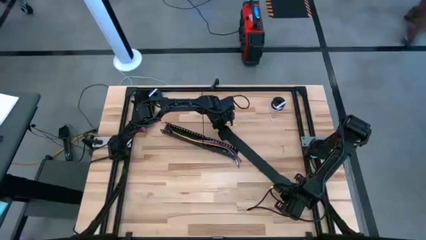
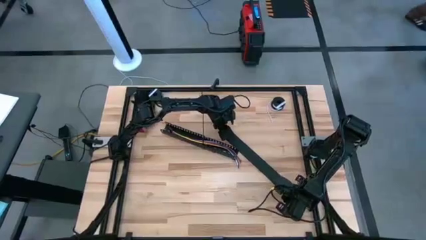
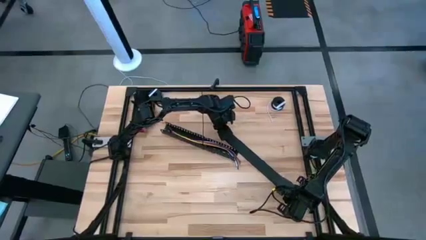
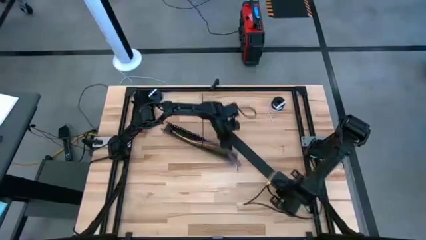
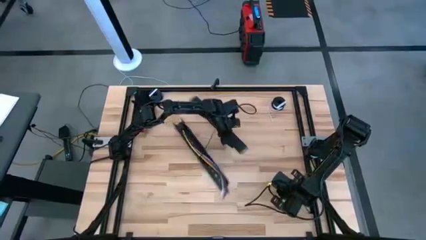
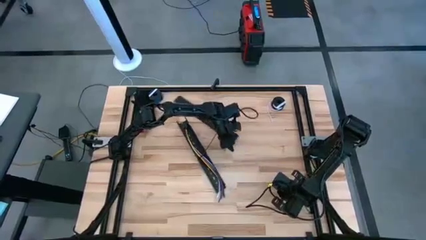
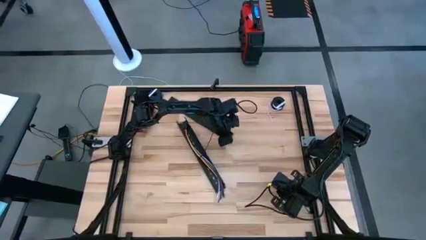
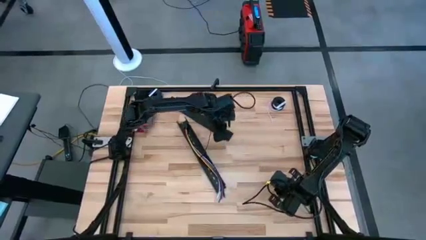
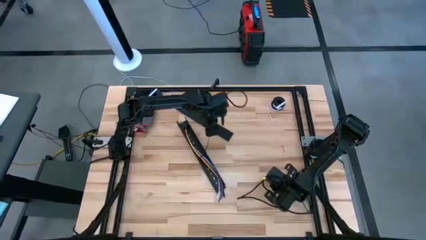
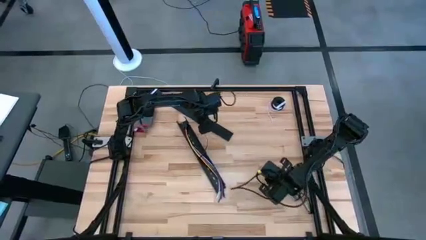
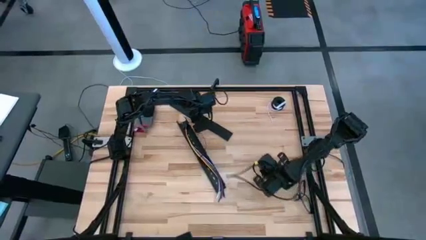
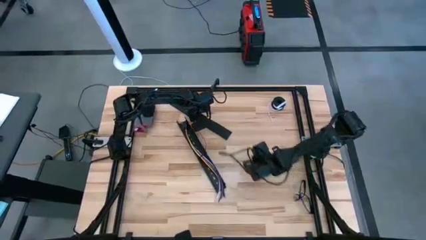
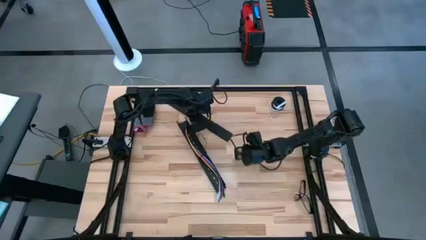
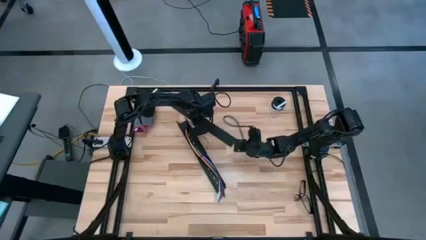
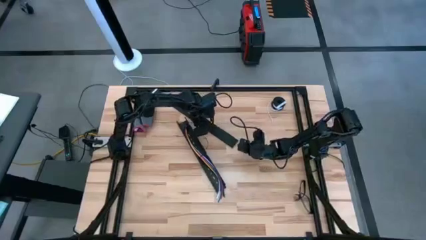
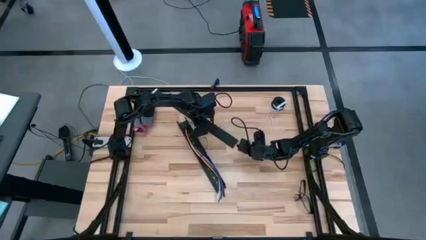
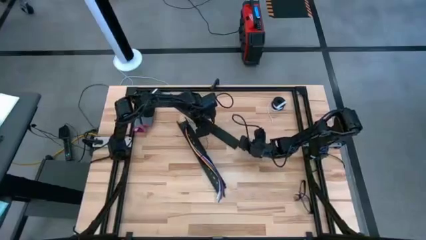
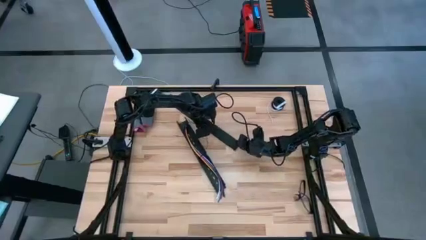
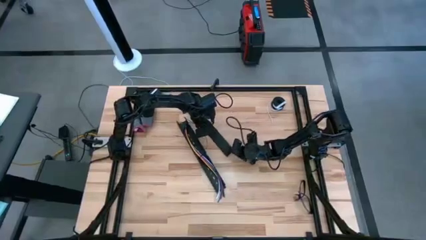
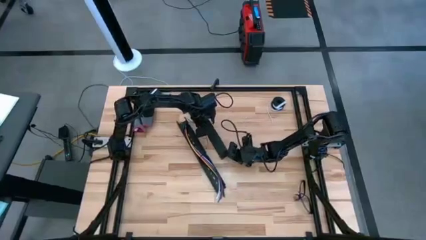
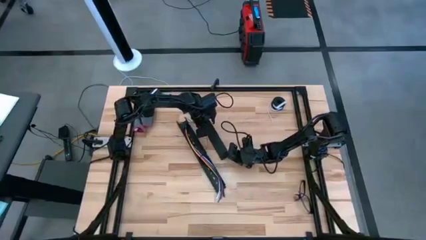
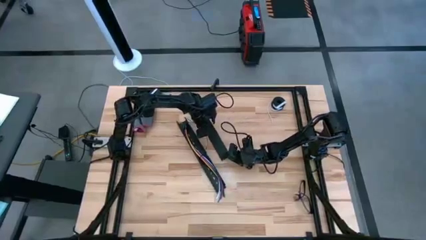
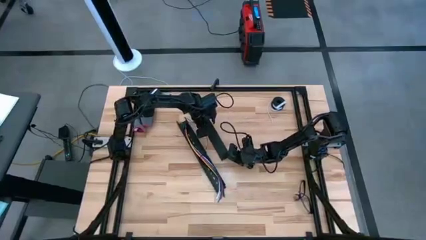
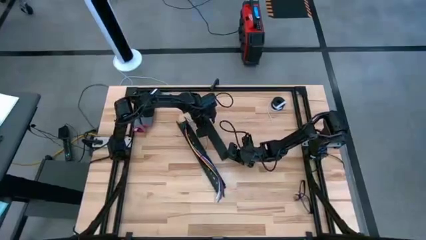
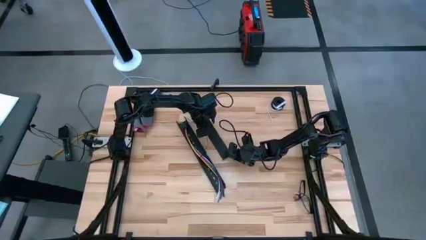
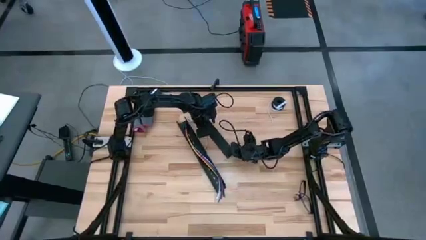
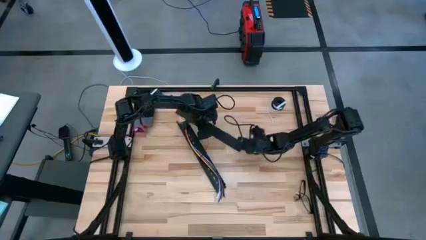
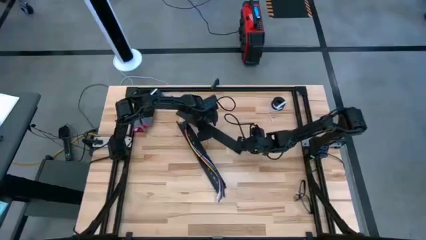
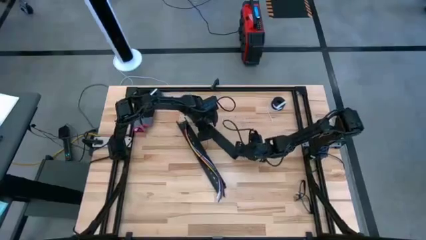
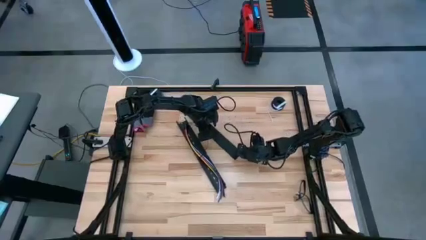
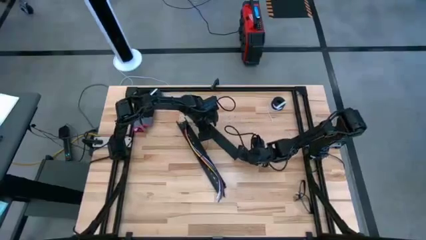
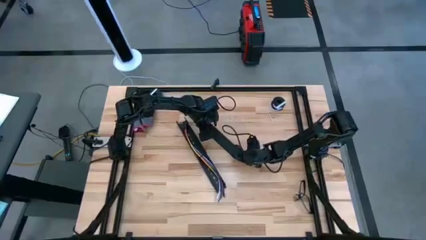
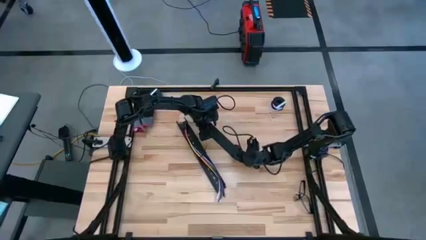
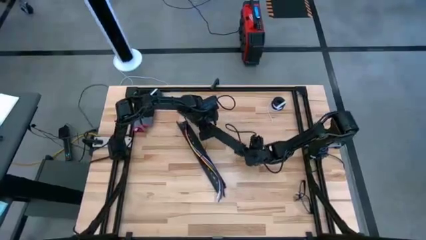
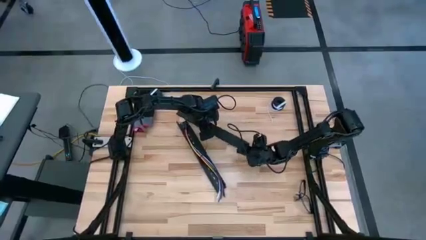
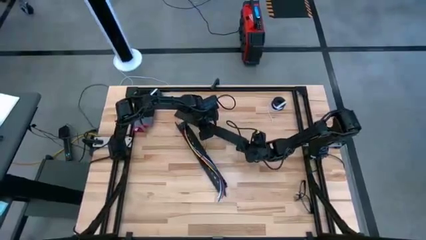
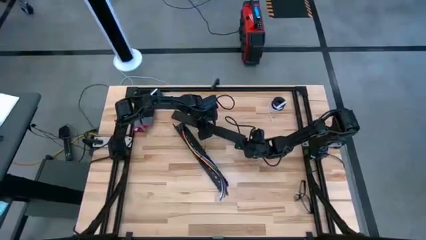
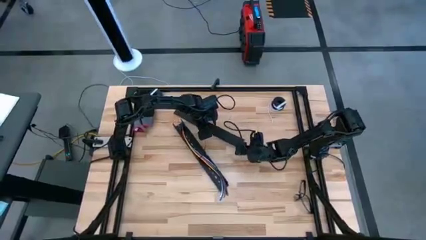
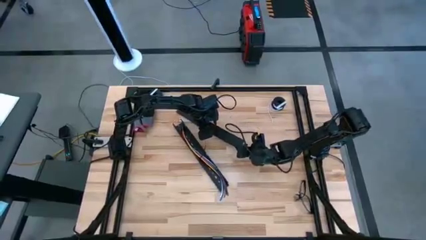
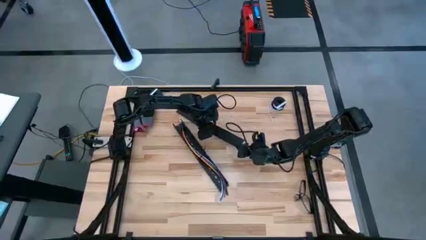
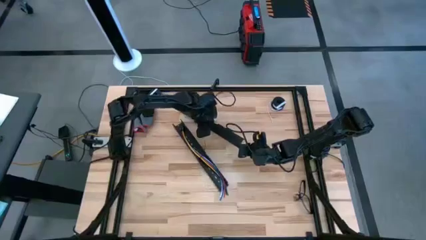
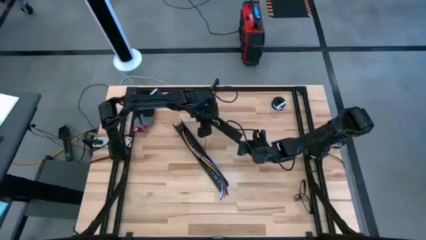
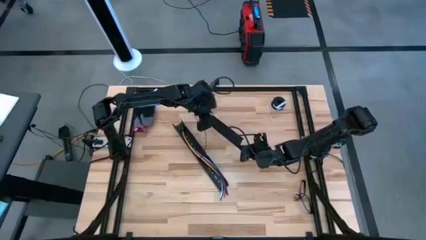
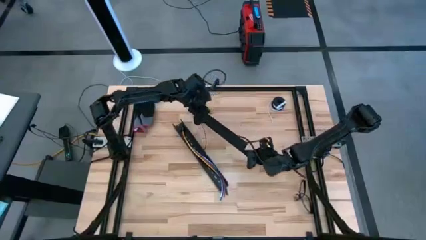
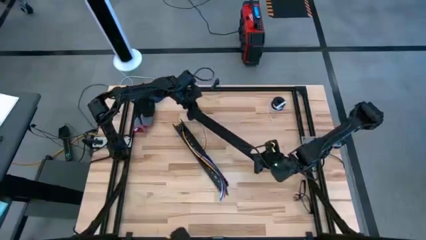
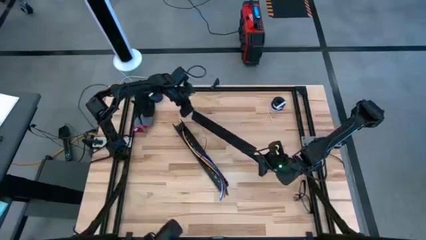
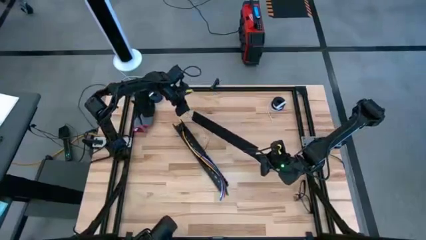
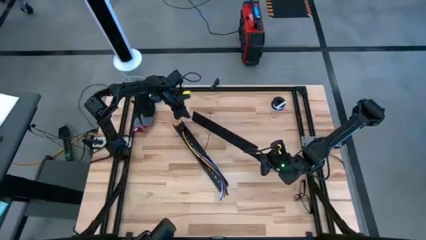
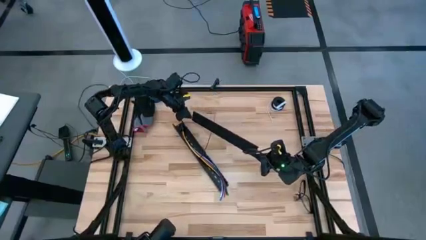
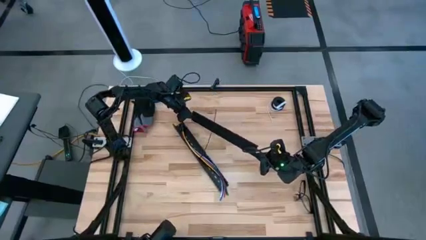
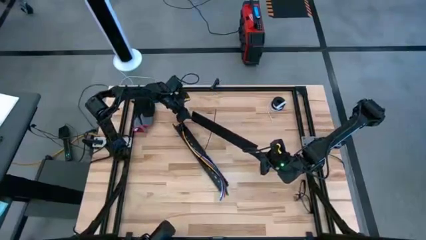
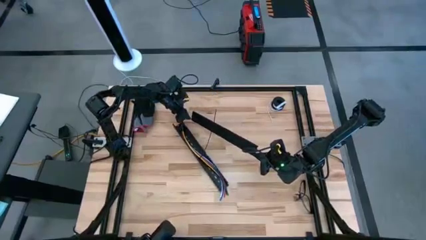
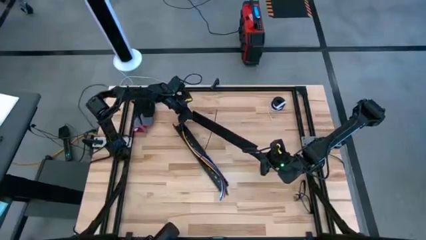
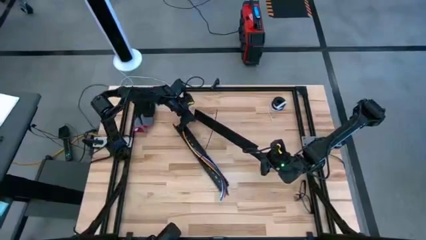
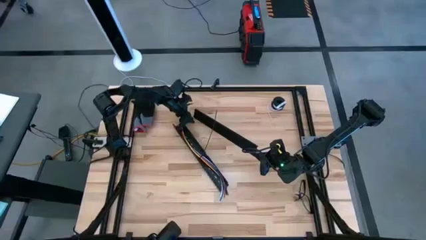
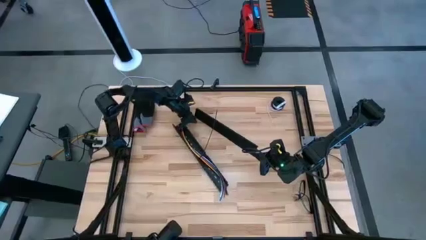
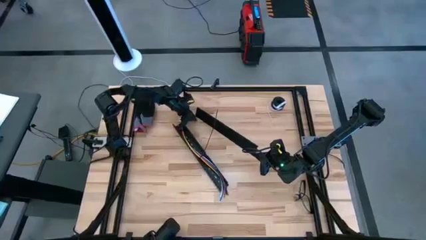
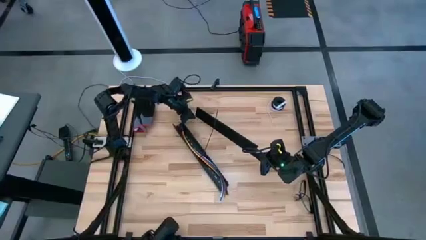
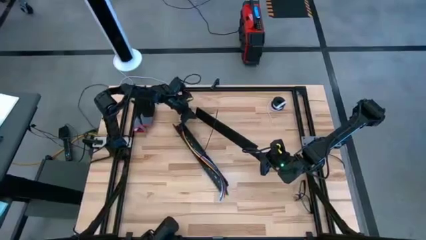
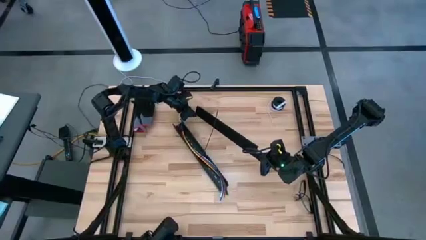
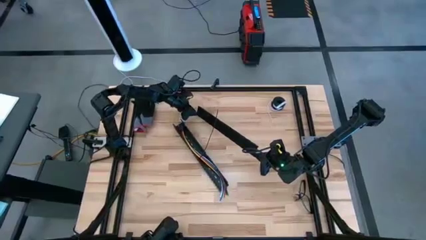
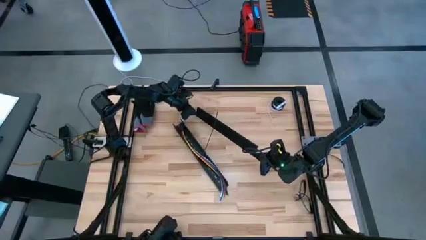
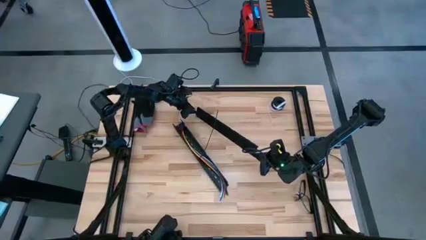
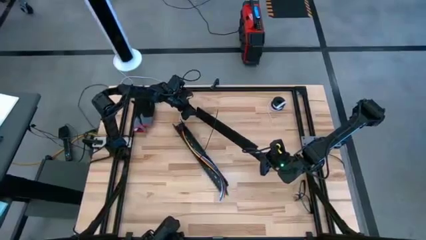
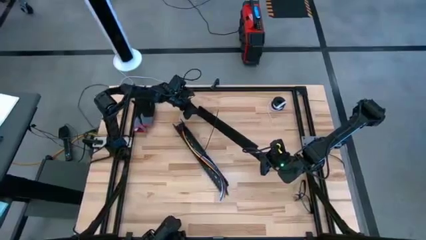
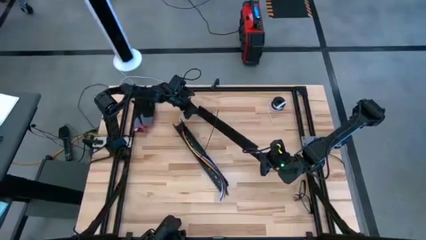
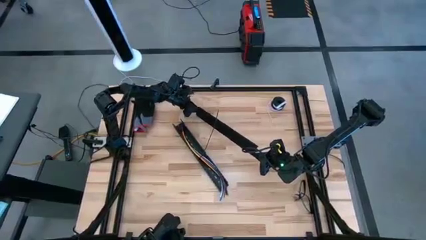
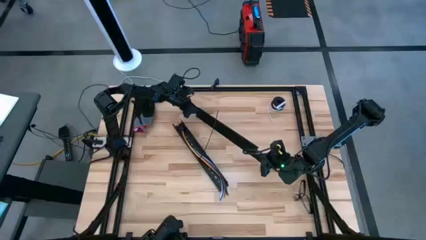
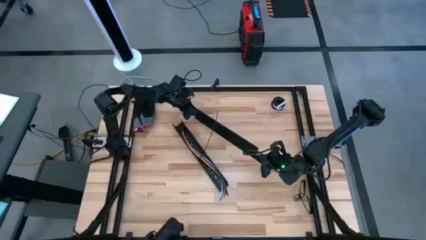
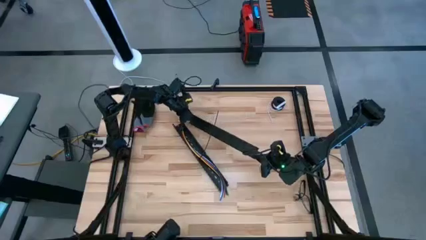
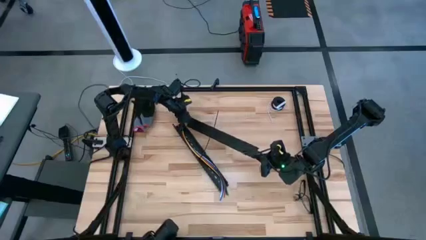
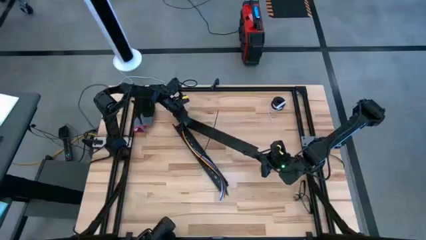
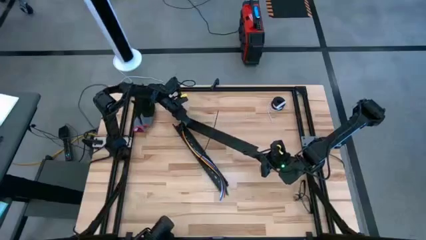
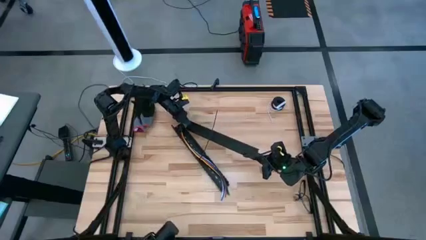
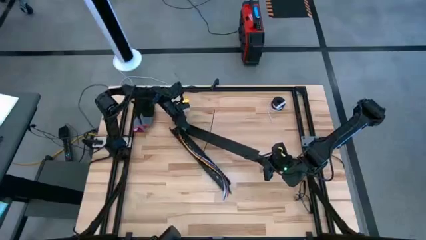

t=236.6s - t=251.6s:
Task: Ziptie cables
Close the black cable duct

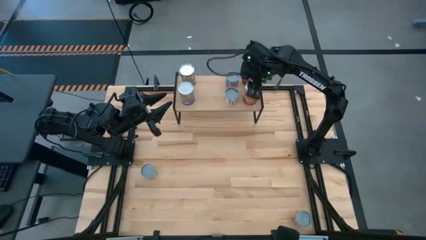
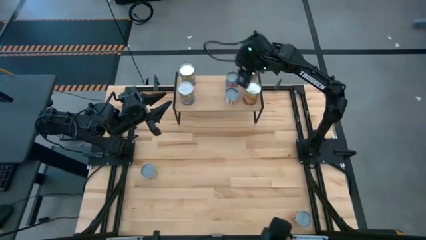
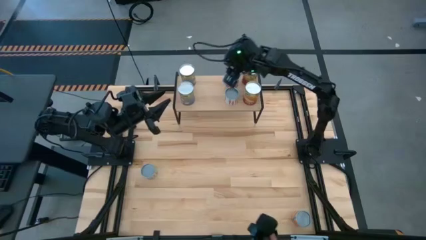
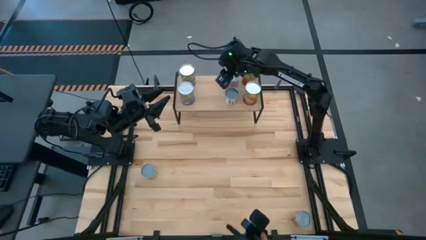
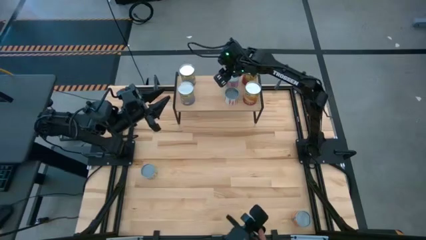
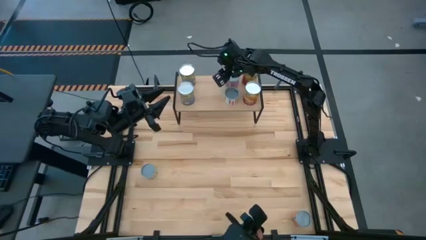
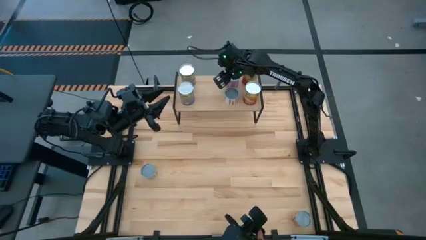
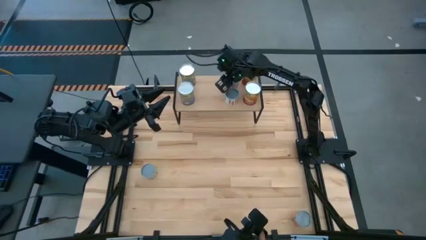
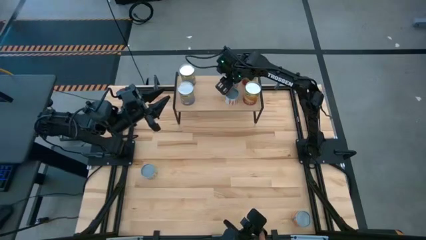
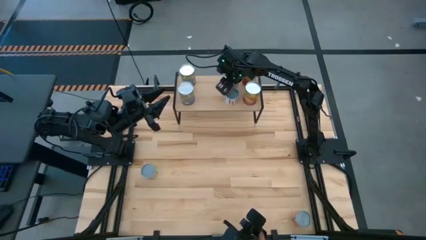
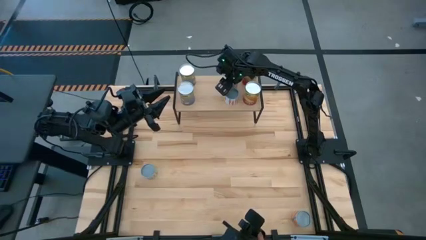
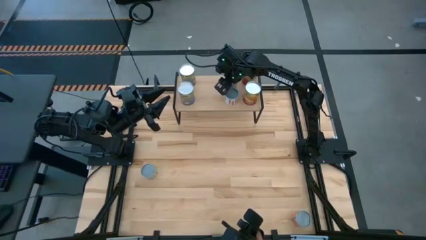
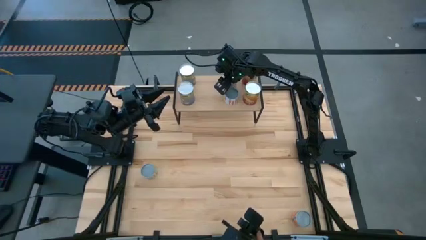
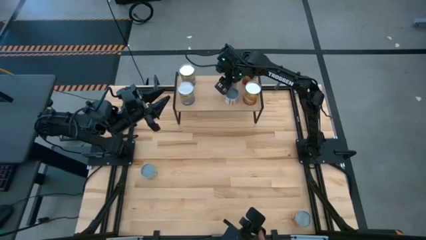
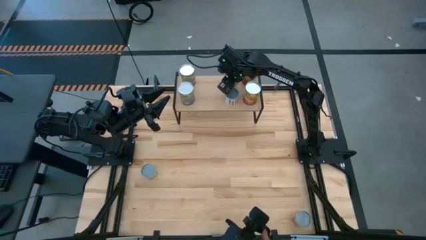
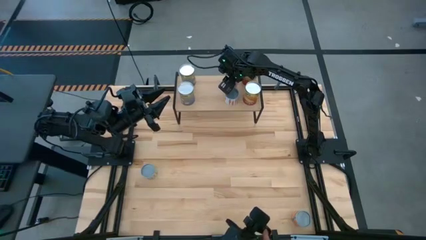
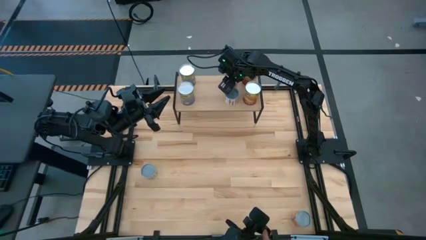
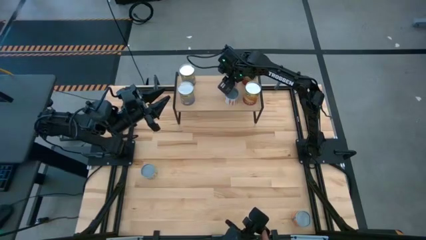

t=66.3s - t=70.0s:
Task: Pick and place cans onto a shelf
Adjust the small canned corn on the shelf
